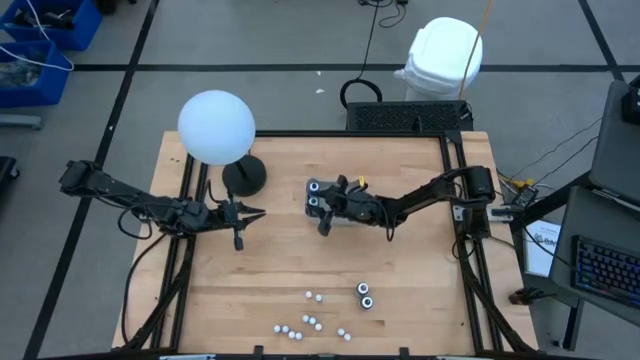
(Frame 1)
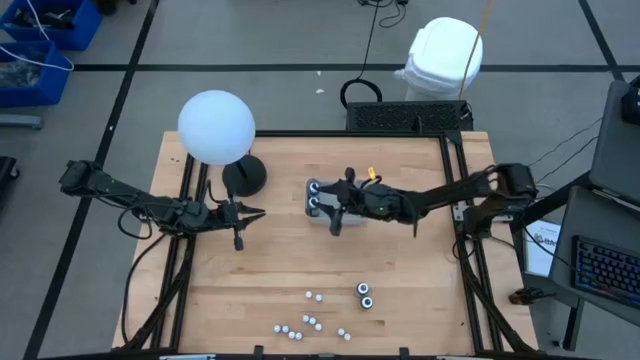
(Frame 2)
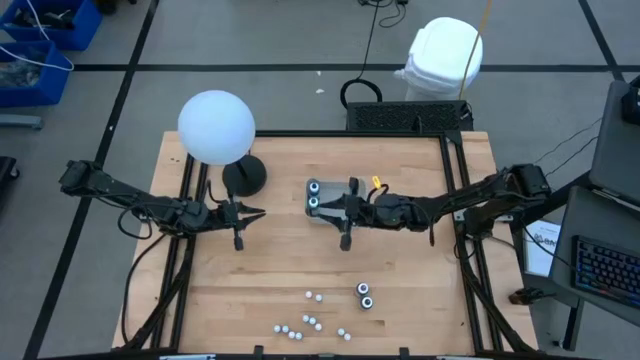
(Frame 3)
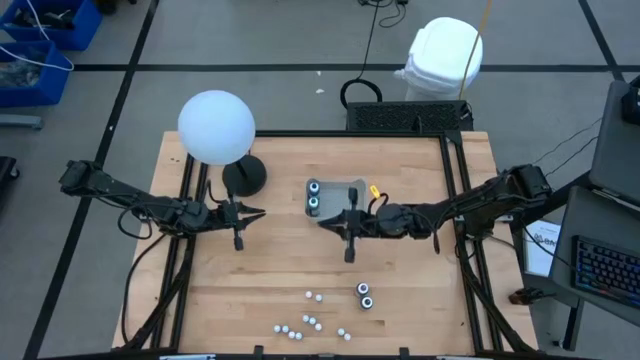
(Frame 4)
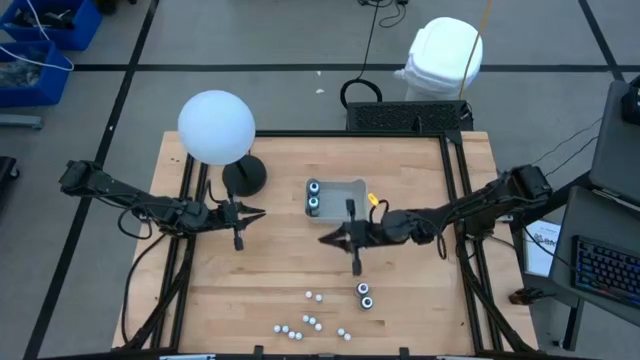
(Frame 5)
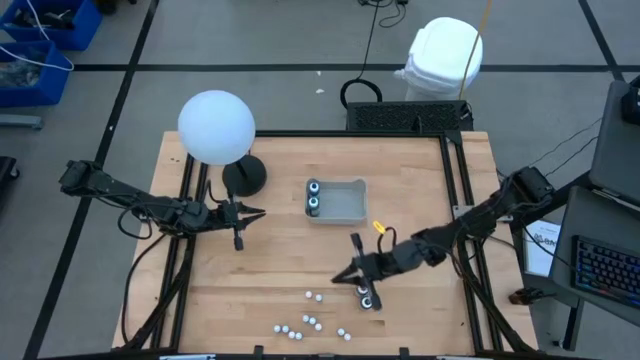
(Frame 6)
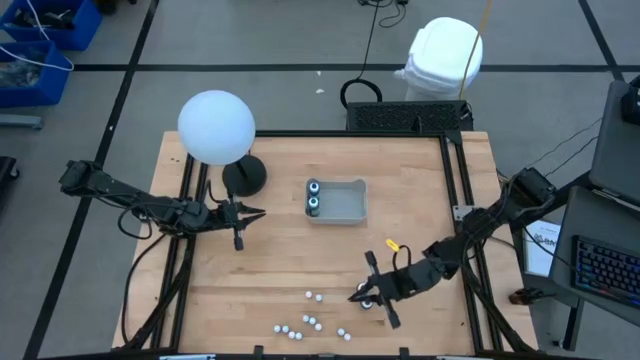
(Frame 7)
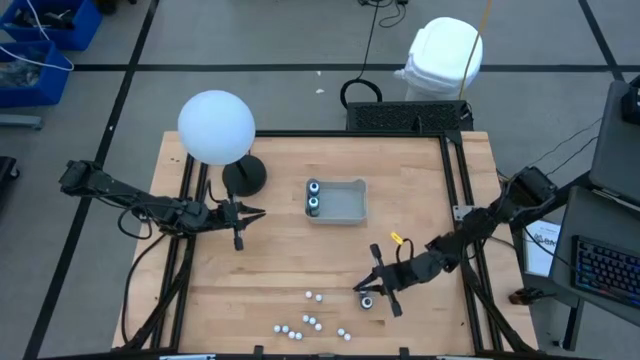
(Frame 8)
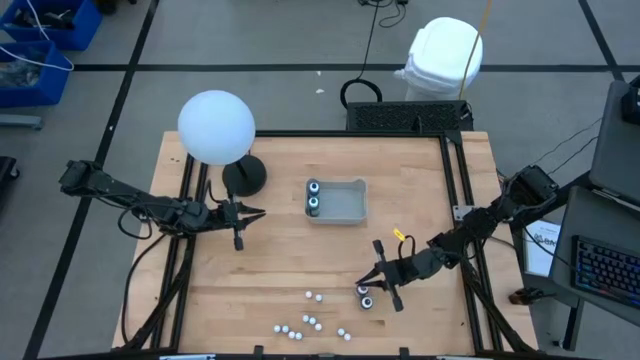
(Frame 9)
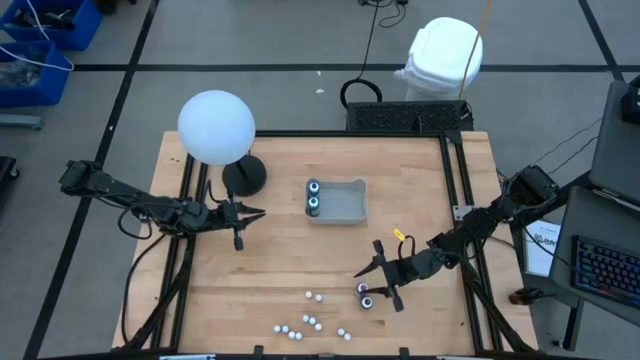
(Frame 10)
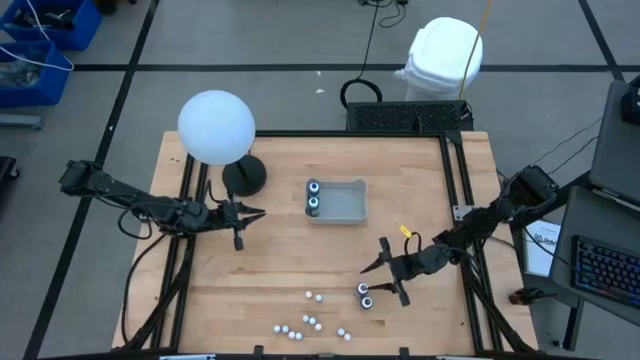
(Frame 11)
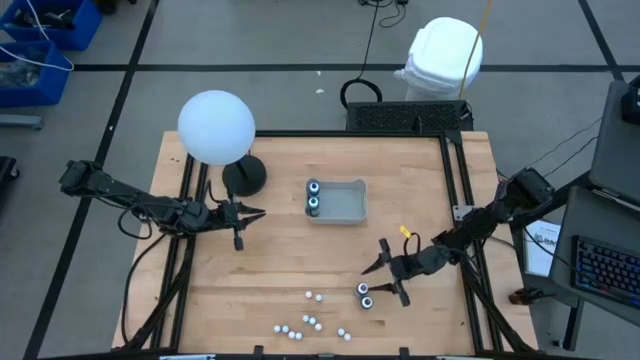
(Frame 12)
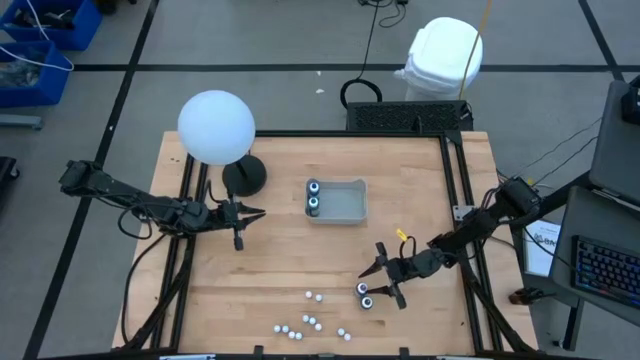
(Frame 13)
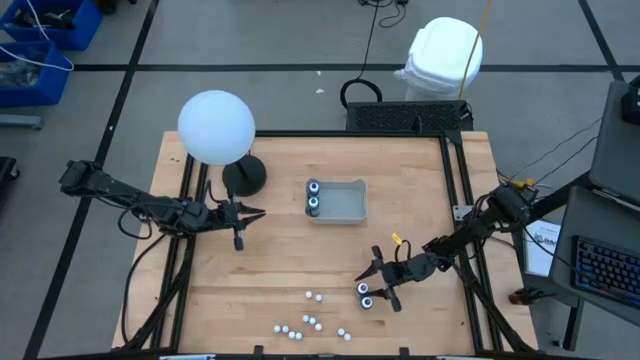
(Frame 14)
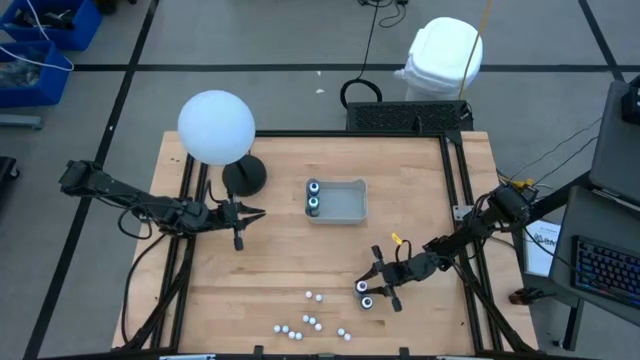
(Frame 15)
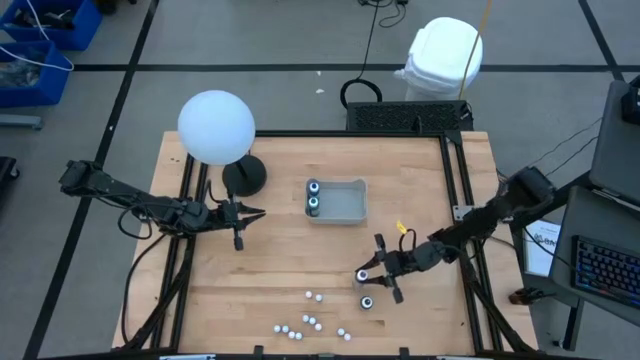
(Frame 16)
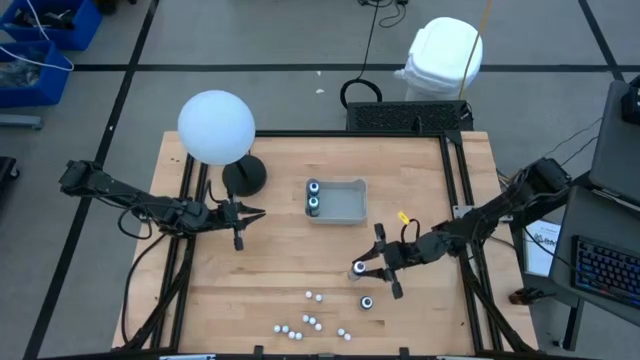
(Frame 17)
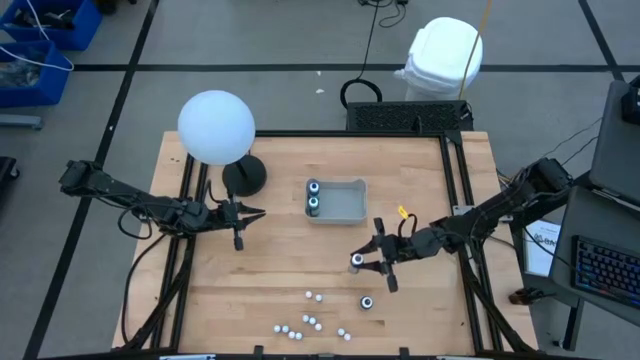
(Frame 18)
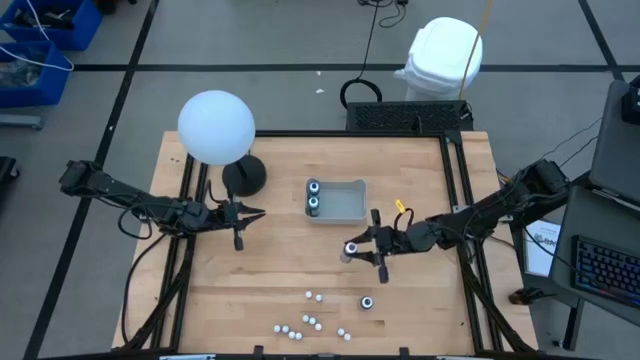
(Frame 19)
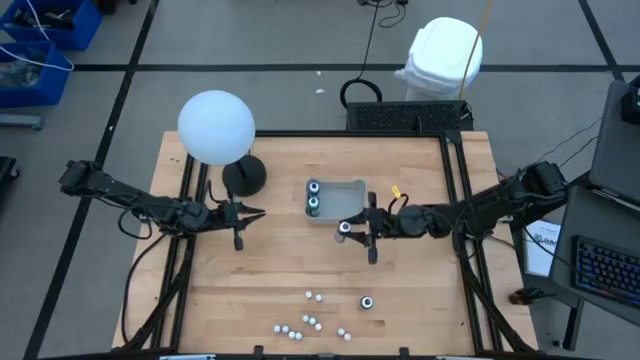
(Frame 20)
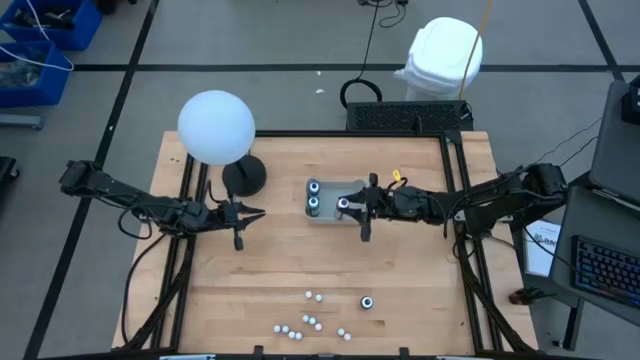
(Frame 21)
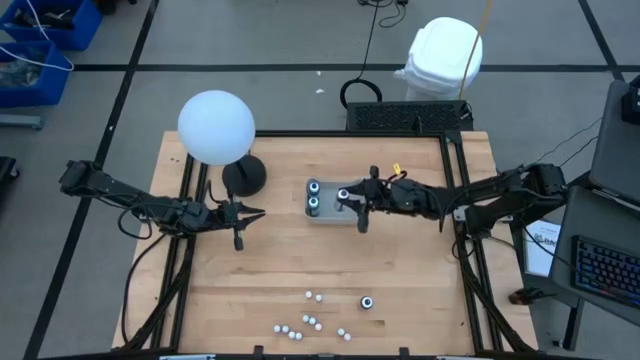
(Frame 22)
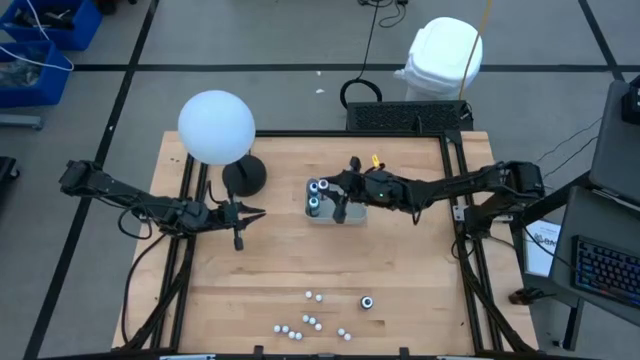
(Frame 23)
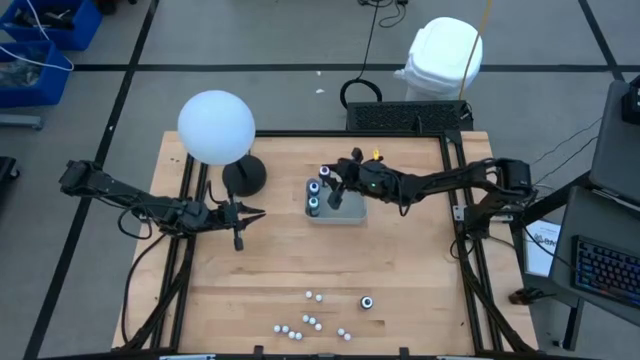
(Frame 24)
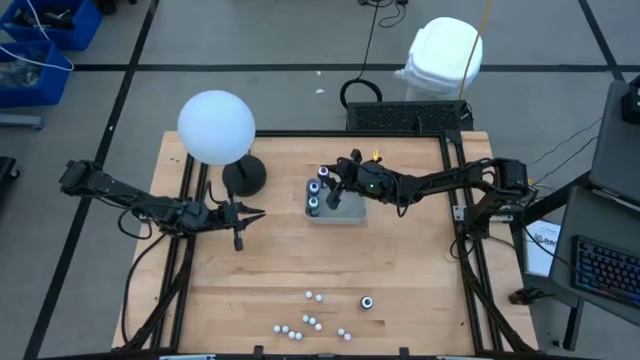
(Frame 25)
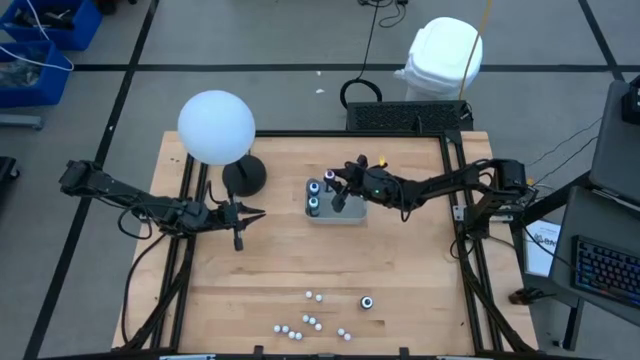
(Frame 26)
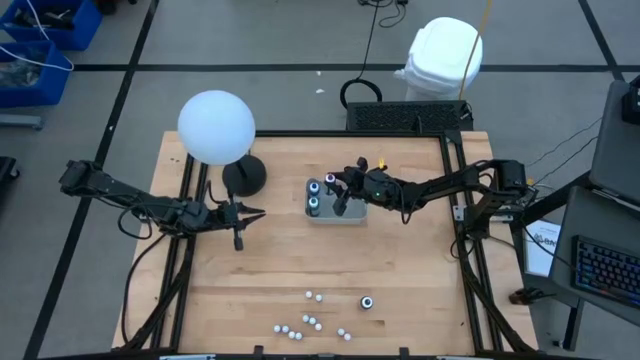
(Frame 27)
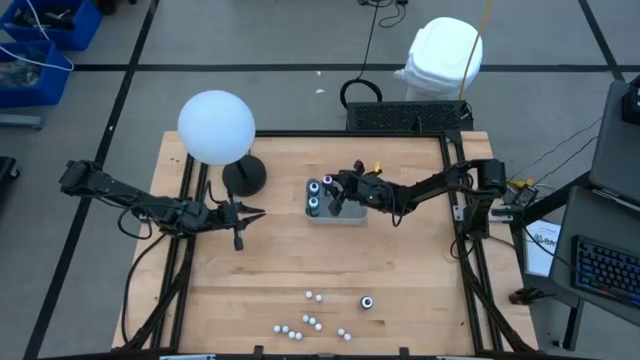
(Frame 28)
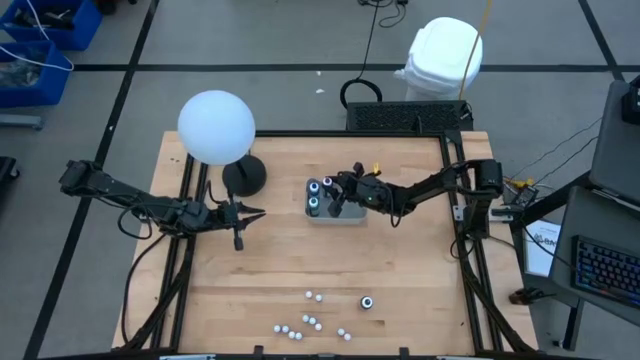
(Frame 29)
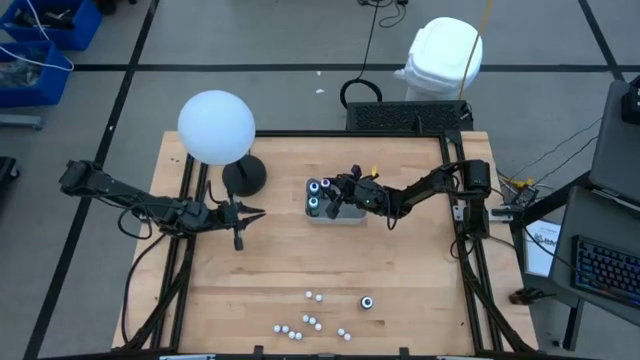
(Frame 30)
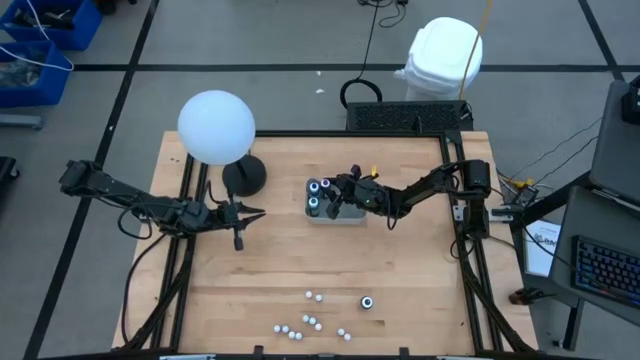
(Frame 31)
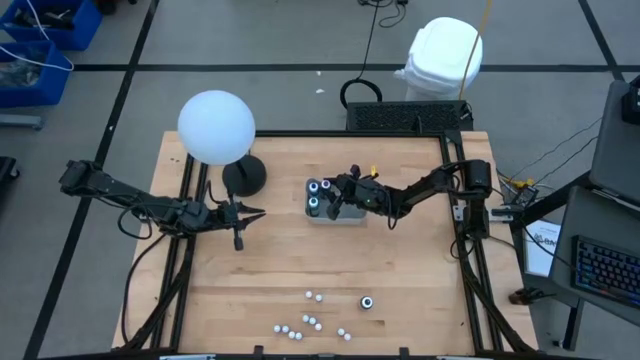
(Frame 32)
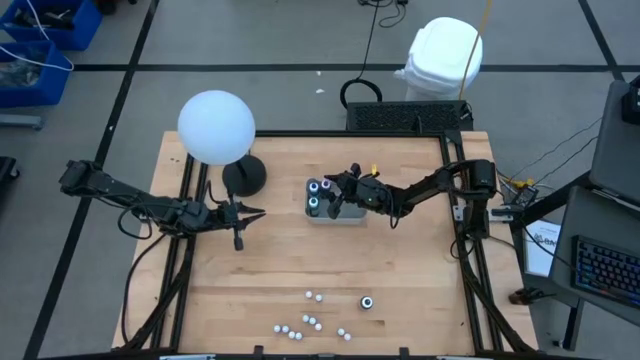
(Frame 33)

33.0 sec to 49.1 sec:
Task: Pick & Place food coloring
Put the big purple food coloring bottle into the gray bin

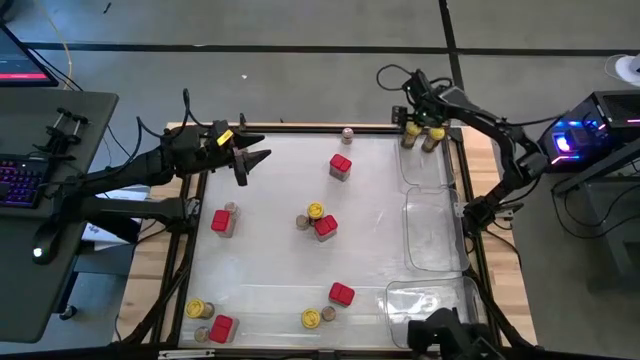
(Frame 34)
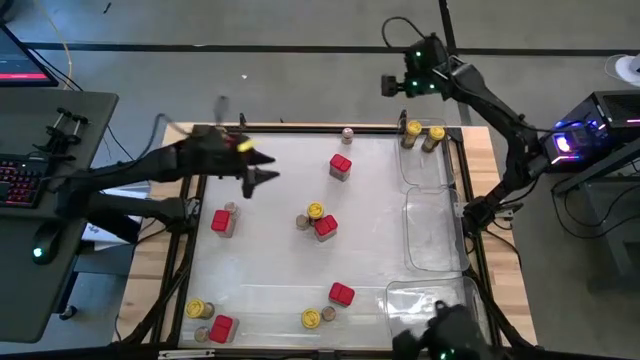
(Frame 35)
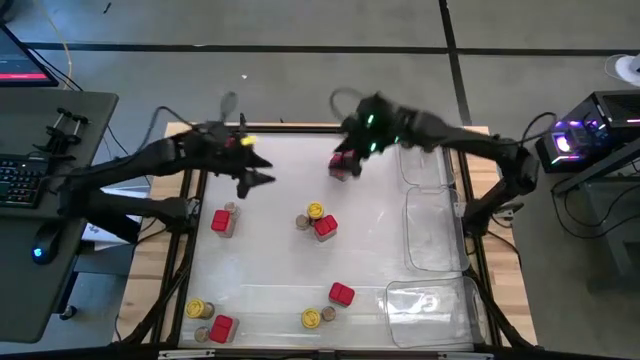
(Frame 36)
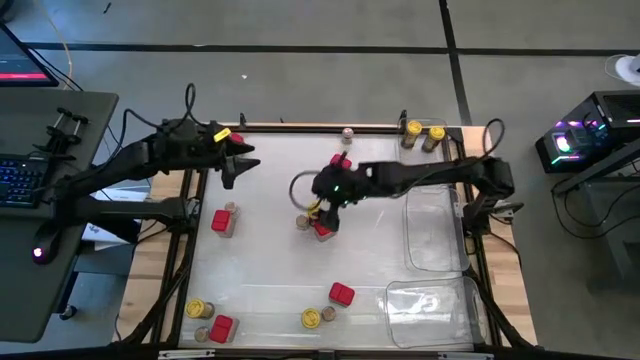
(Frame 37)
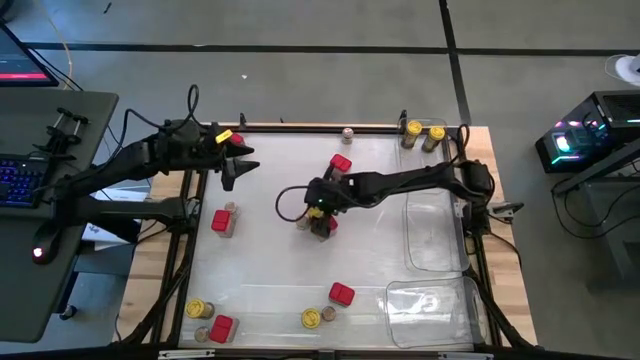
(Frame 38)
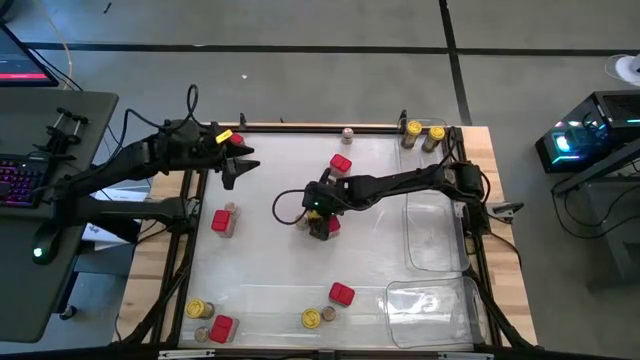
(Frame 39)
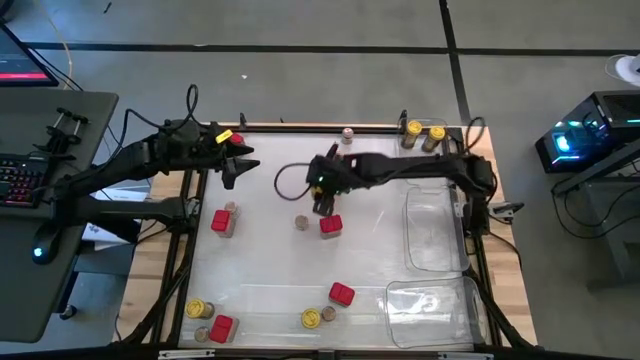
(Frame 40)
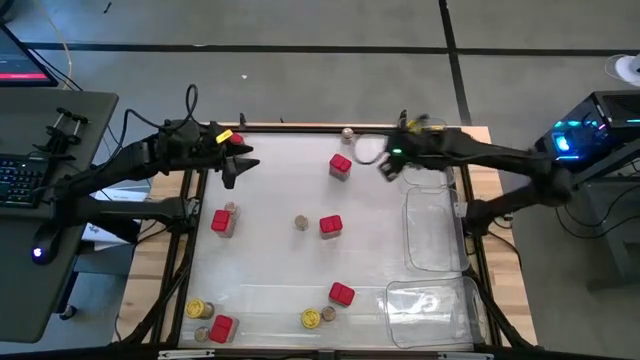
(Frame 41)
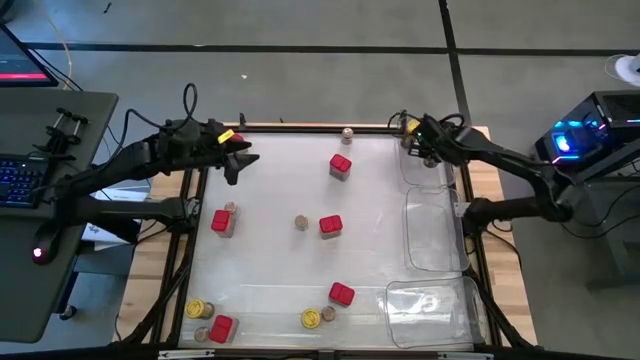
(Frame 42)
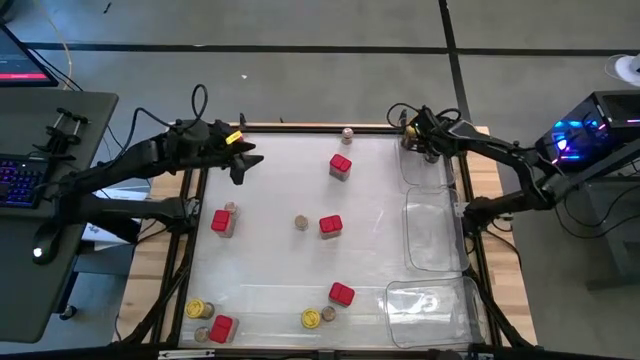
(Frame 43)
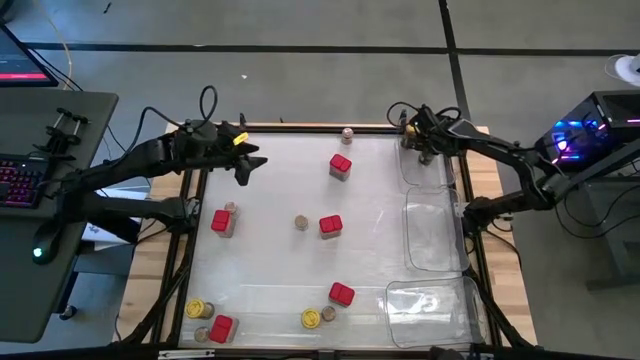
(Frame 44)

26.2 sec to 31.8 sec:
Task: Sort spices by type
Put the yellow seasoning bottle into the top transparent bin
